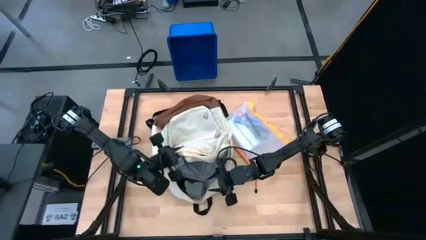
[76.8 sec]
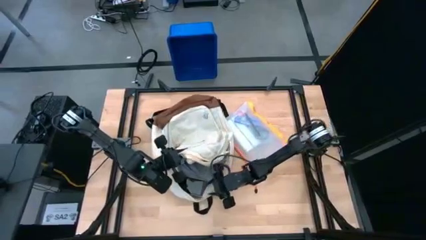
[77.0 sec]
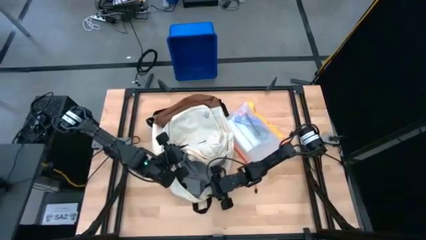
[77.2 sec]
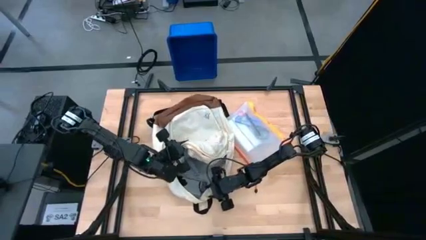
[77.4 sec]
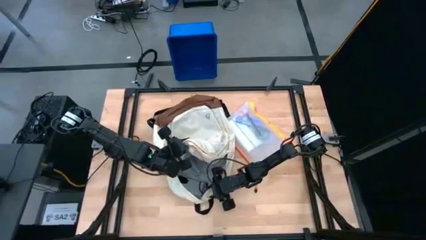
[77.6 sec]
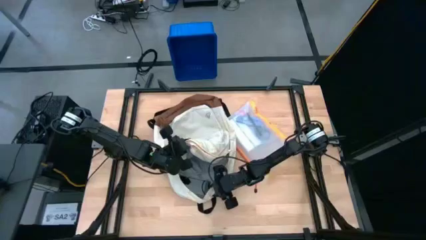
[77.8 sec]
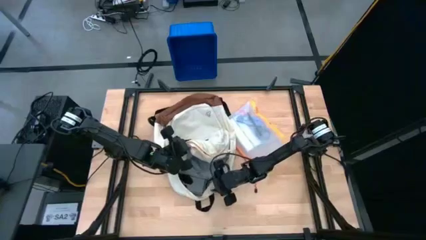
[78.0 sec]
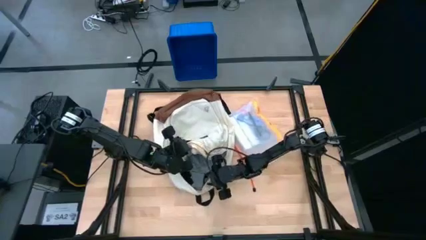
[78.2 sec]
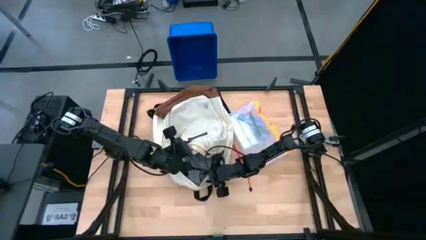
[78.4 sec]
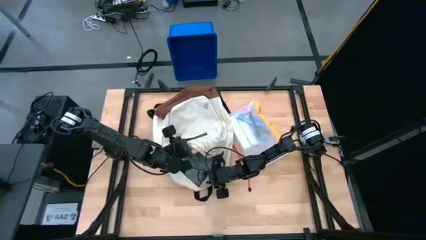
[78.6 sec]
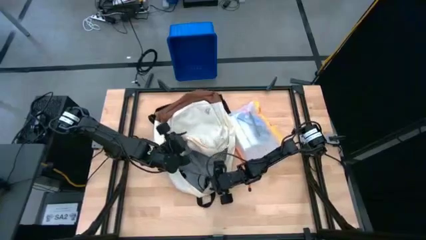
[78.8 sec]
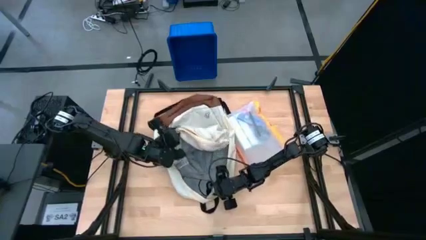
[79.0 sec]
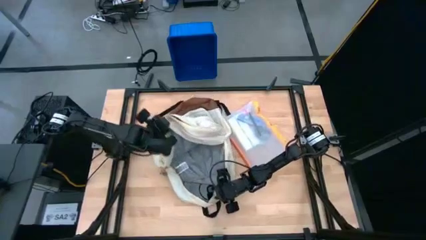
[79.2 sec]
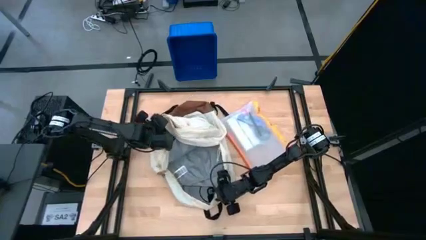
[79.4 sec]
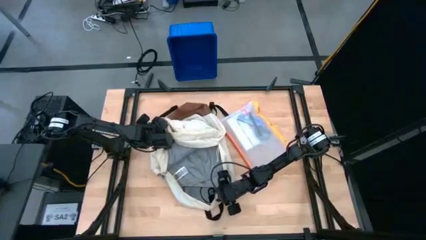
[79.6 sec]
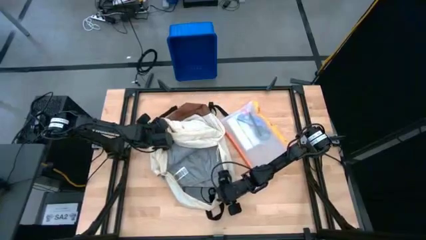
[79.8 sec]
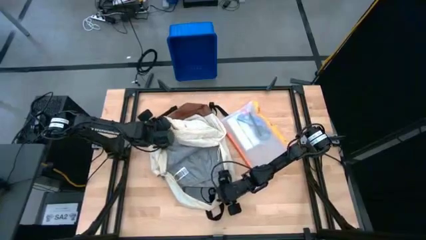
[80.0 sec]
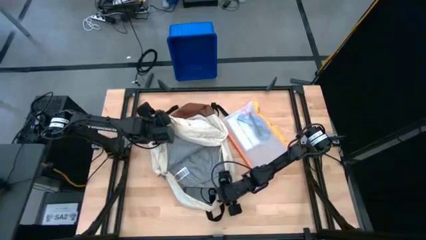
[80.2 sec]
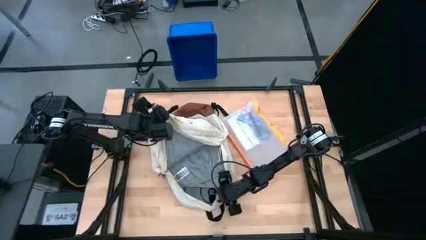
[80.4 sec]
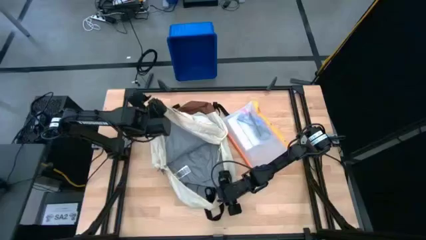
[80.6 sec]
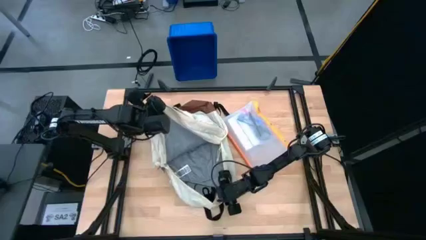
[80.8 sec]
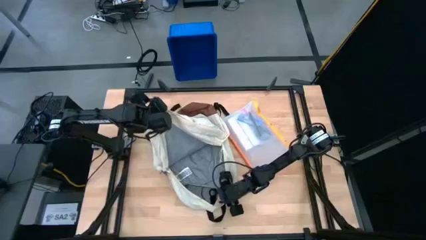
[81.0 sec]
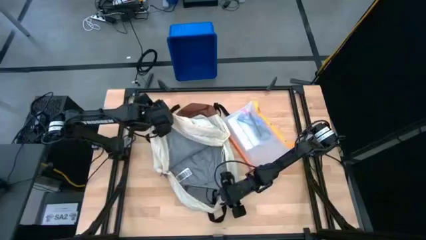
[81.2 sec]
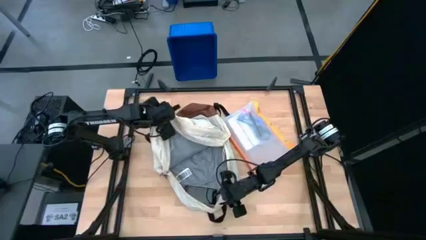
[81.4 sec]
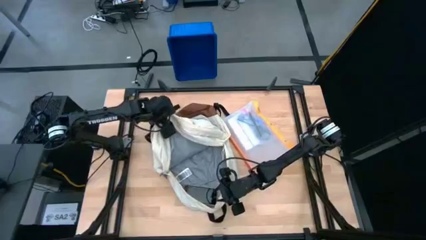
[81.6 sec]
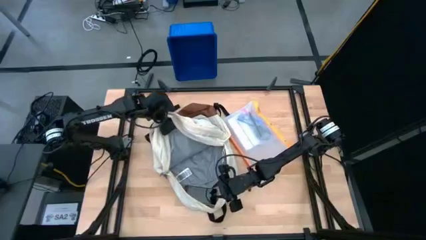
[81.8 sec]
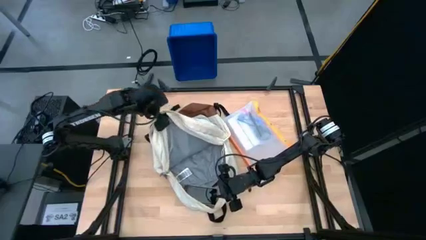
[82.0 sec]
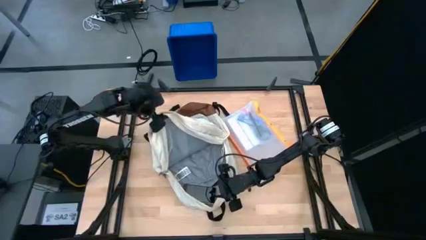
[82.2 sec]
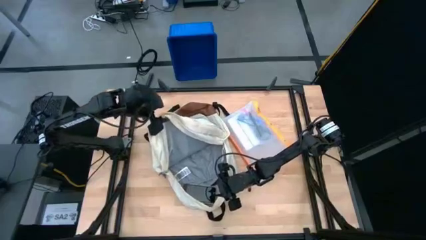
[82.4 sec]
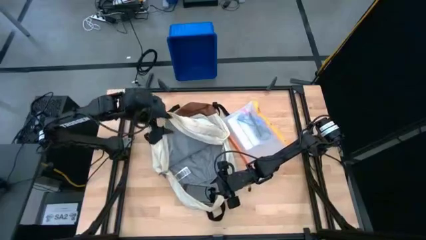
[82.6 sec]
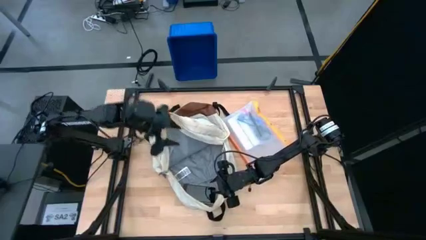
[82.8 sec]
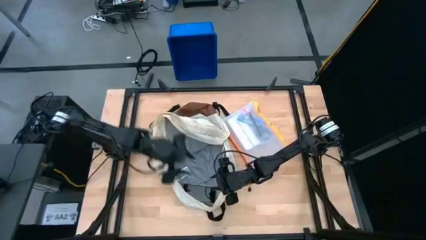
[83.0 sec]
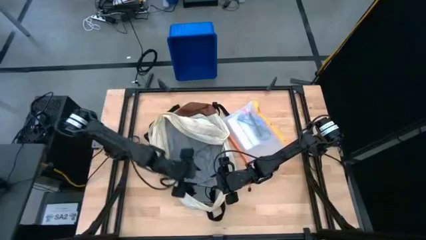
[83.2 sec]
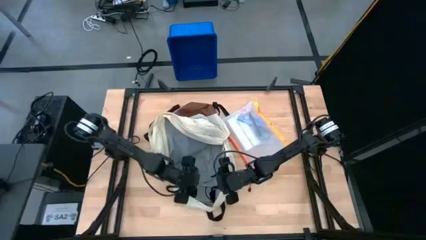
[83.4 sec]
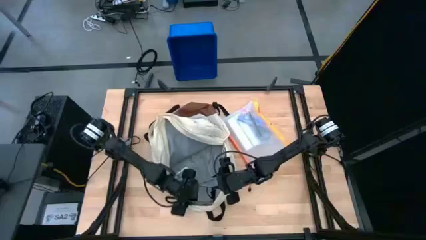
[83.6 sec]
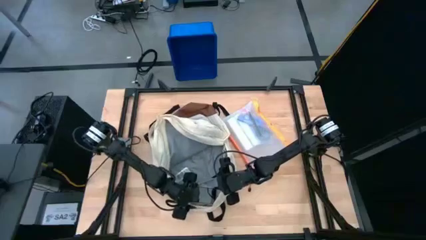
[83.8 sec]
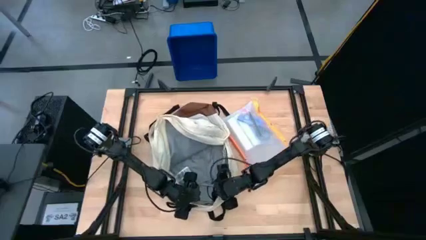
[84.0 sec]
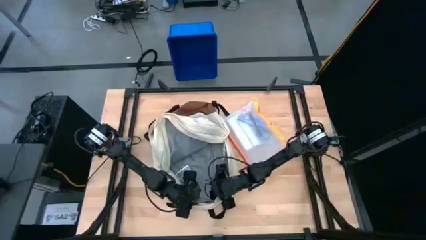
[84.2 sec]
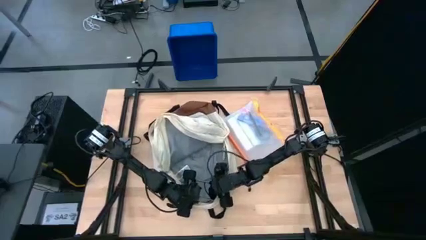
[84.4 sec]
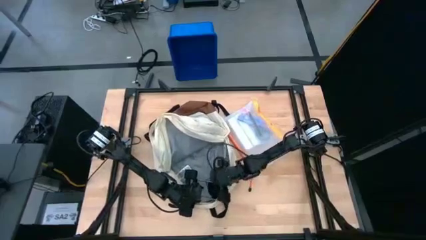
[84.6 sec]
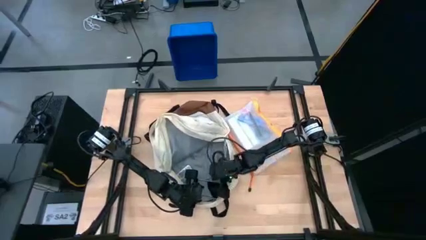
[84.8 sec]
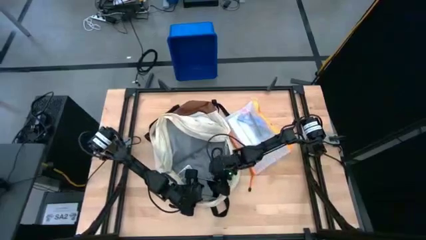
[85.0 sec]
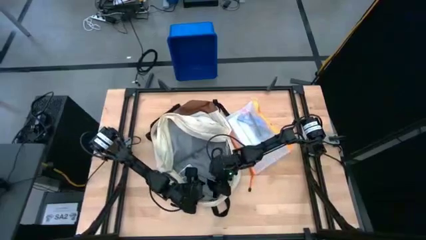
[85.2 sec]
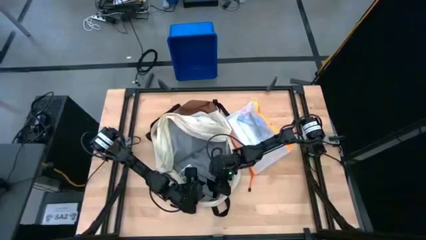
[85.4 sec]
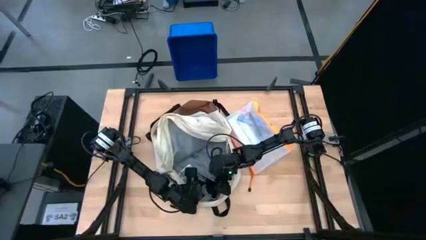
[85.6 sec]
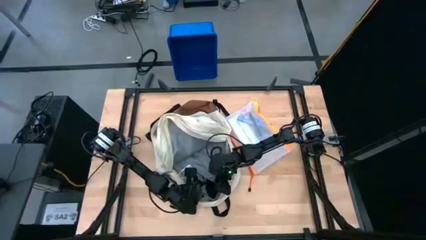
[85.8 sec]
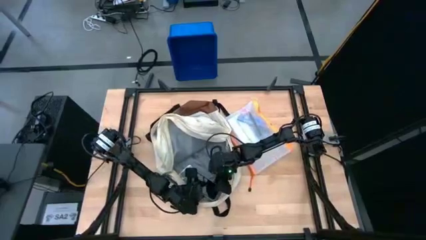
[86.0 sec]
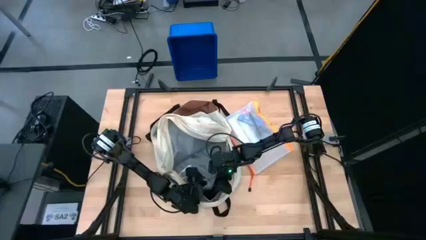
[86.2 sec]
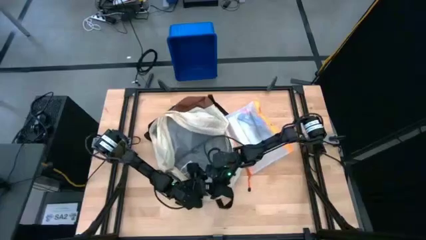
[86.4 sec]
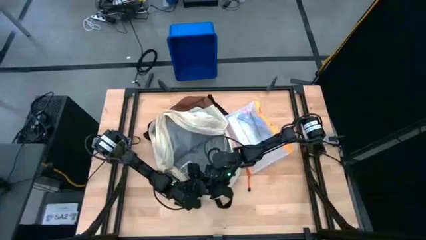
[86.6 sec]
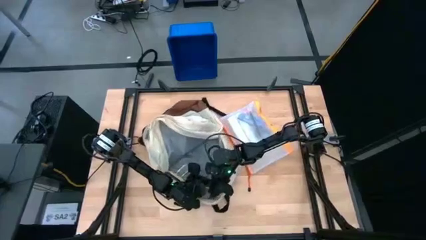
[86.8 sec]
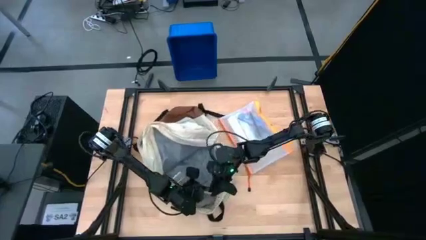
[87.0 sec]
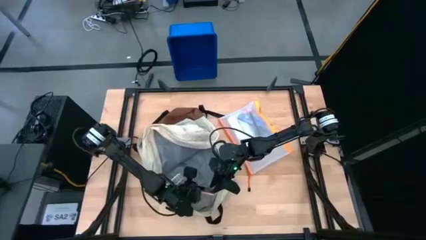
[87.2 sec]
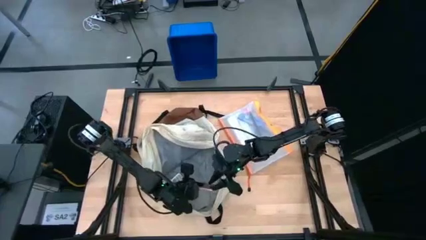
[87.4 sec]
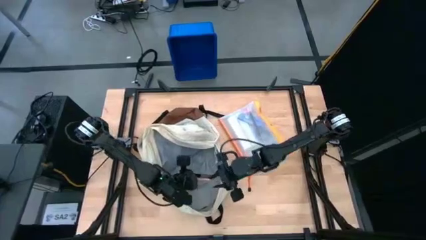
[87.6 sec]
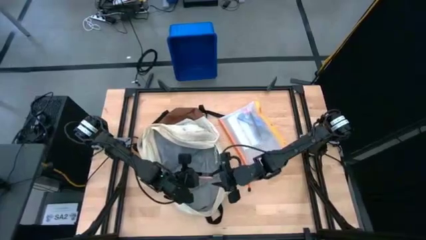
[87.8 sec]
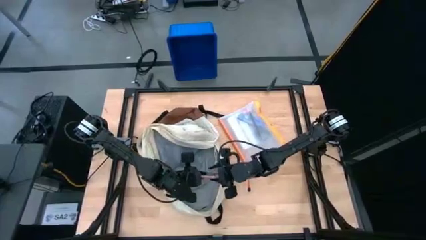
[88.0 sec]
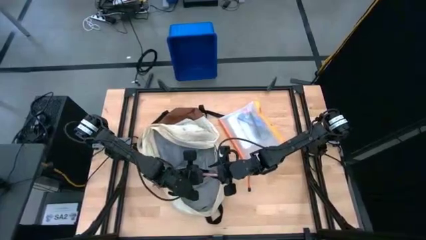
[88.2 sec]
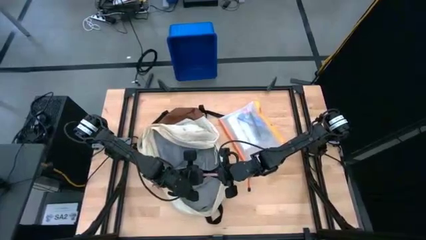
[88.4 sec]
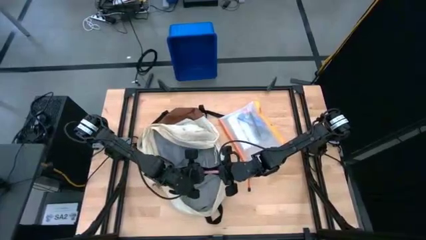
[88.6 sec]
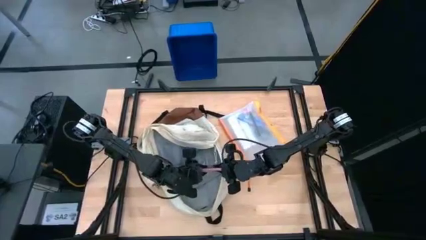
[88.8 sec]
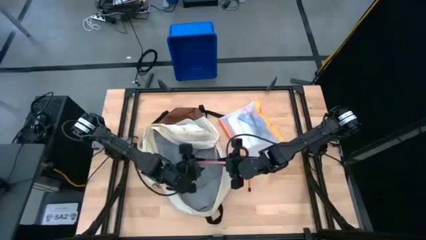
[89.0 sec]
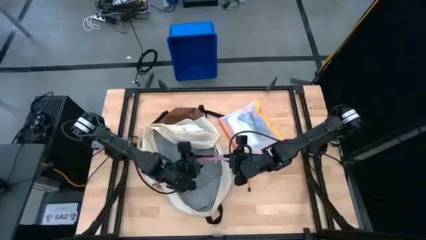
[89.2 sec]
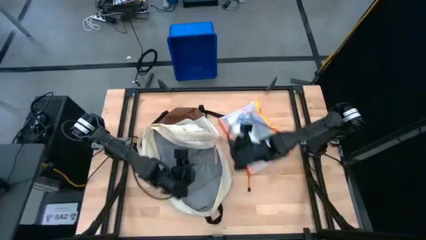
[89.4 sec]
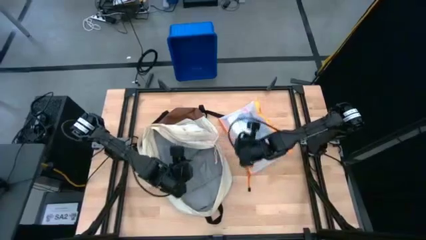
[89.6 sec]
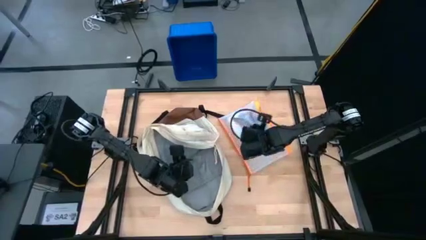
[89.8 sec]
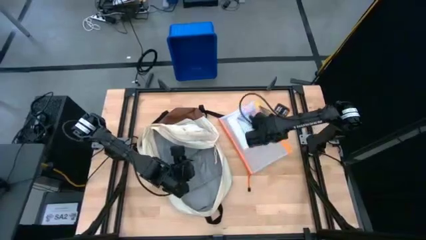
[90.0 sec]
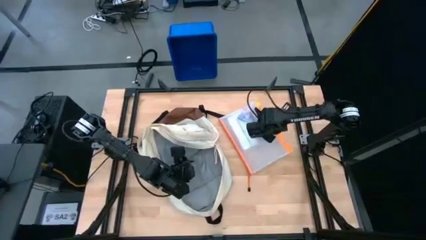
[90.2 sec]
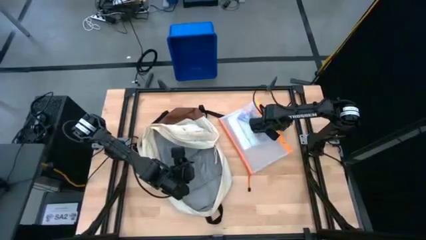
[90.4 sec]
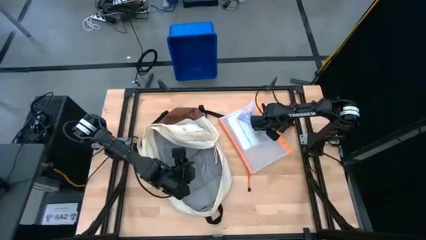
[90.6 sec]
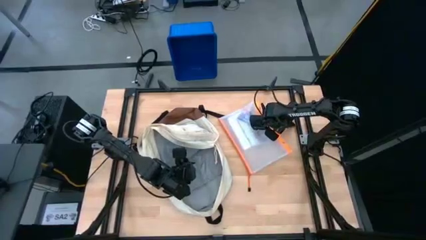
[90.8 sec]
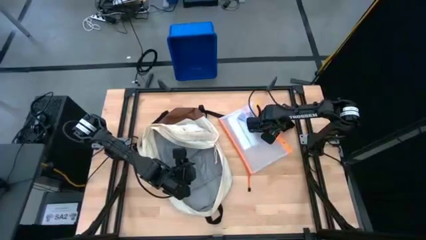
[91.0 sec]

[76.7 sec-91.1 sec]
Task: Unpack backpack
Remove the pink cellphone from the white backpack

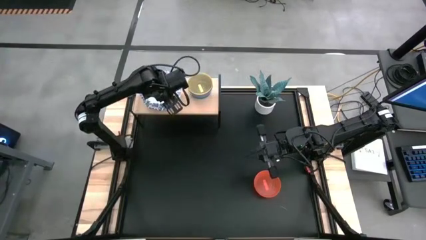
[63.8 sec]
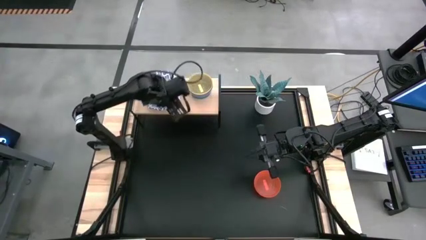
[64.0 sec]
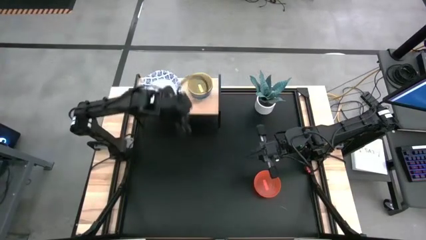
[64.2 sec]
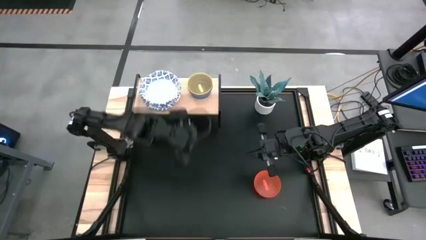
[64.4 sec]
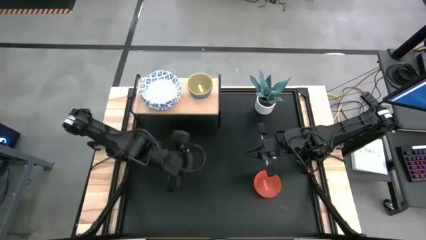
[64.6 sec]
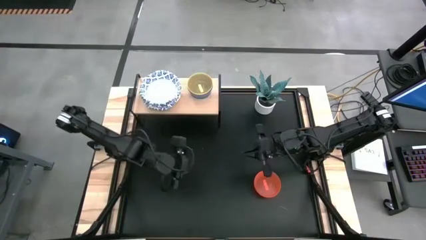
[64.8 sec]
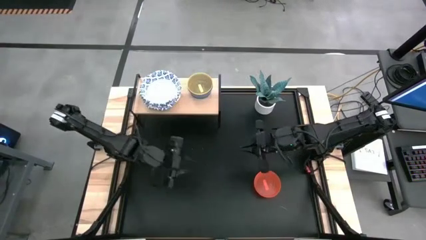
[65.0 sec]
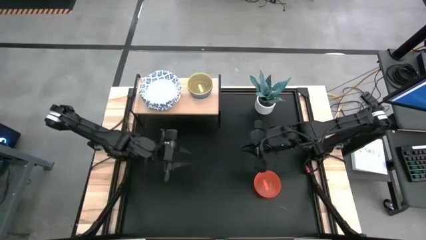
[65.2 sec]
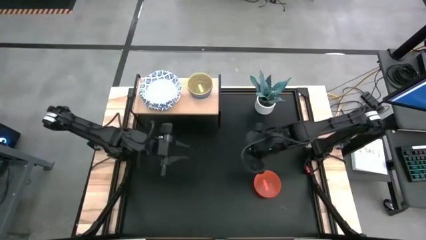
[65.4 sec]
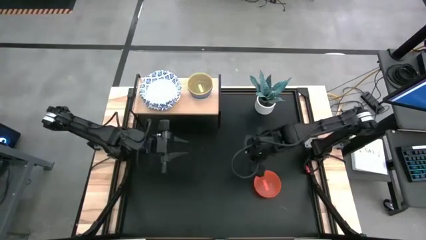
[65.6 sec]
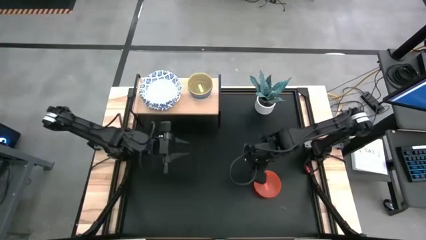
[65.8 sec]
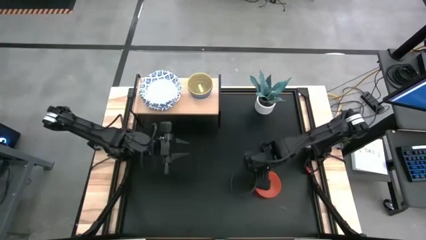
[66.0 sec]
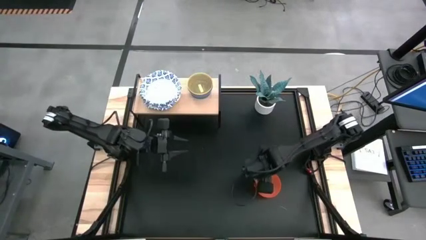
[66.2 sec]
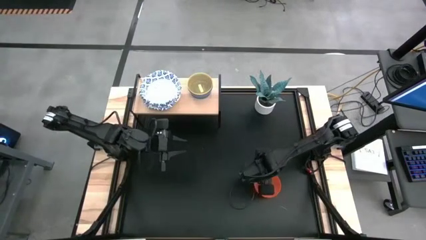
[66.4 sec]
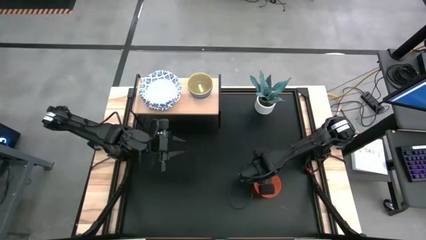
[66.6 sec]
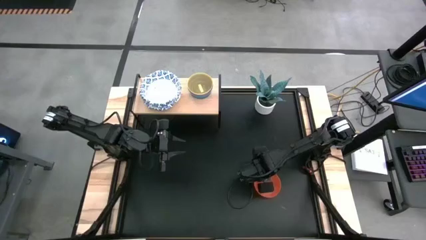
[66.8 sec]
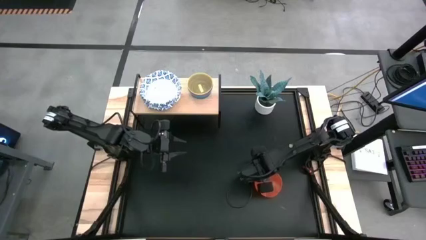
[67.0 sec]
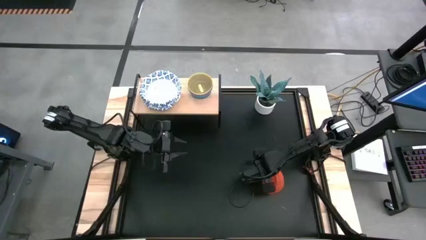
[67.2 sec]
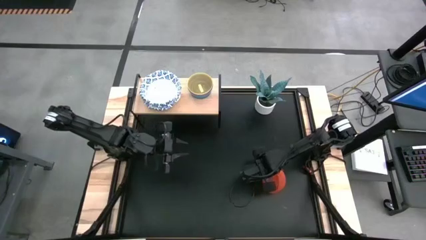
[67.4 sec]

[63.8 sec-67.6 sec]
Task: Place and stack bowls onto a shelf
Stack the small orange bowl on top of the small yellow bowl on the shelf
